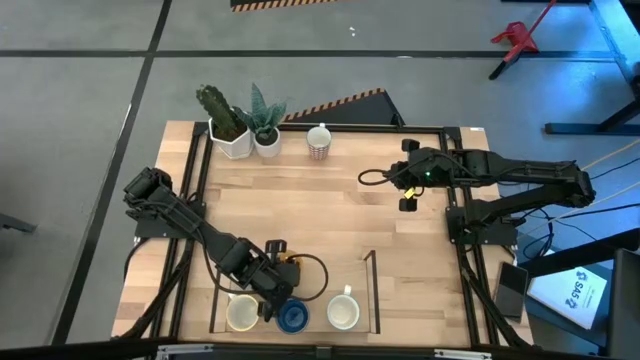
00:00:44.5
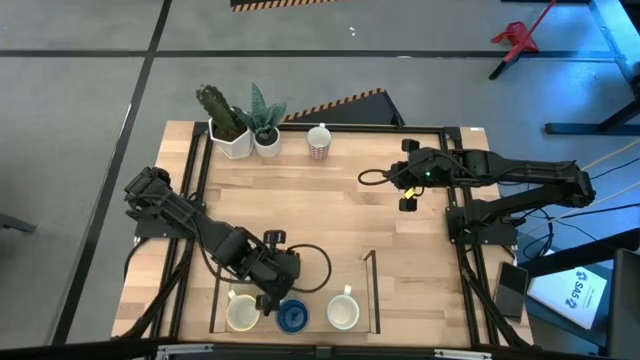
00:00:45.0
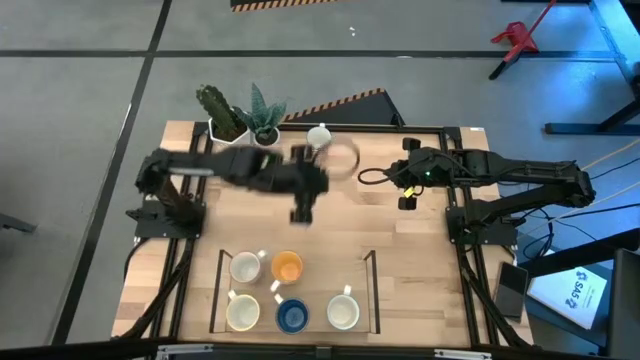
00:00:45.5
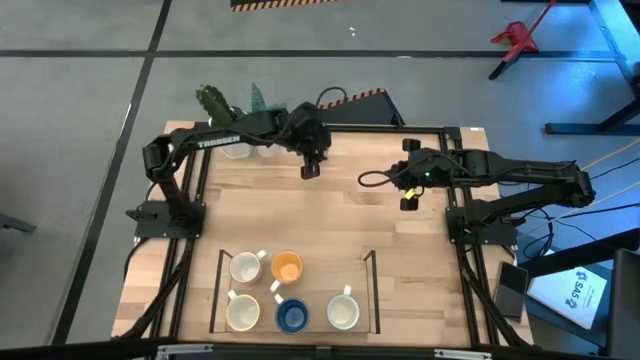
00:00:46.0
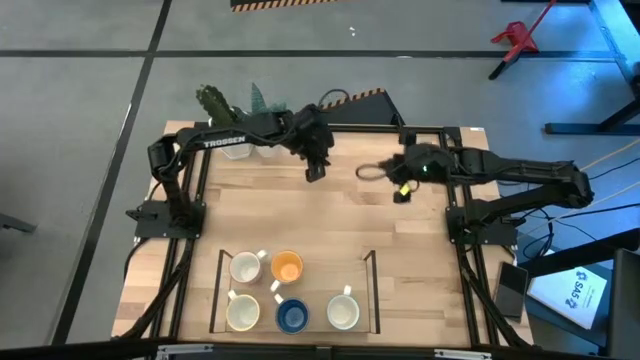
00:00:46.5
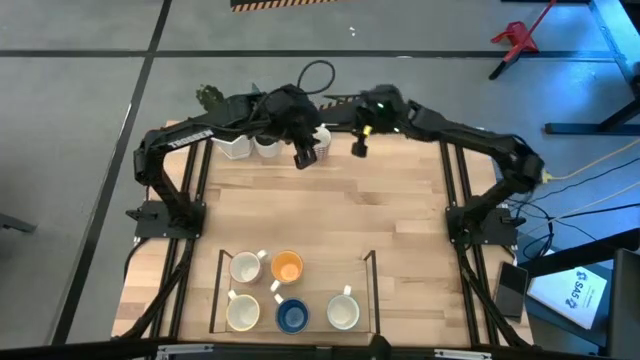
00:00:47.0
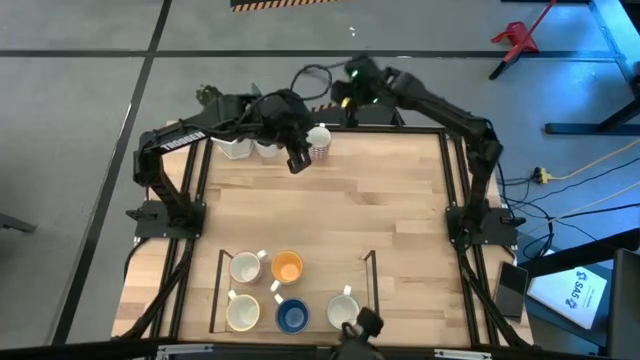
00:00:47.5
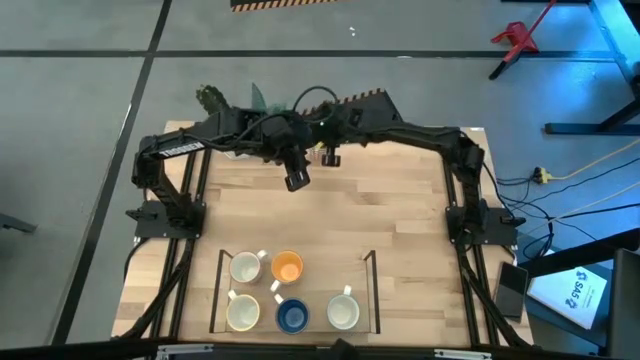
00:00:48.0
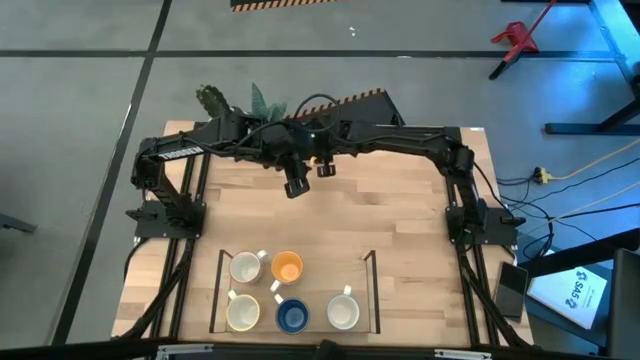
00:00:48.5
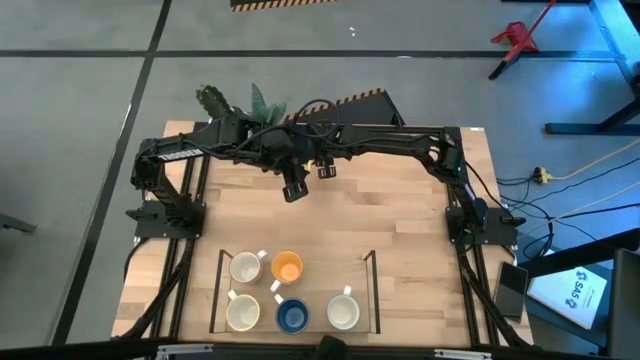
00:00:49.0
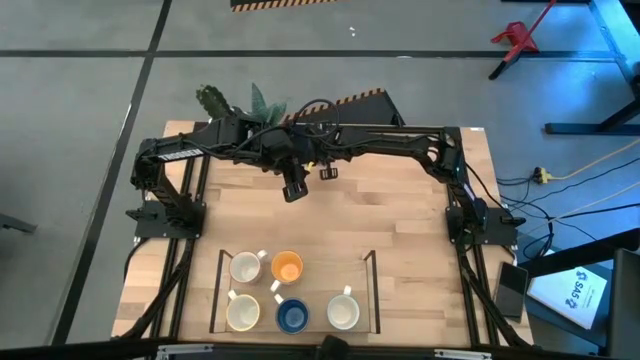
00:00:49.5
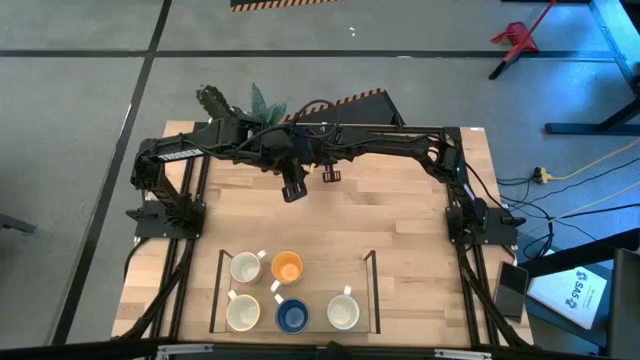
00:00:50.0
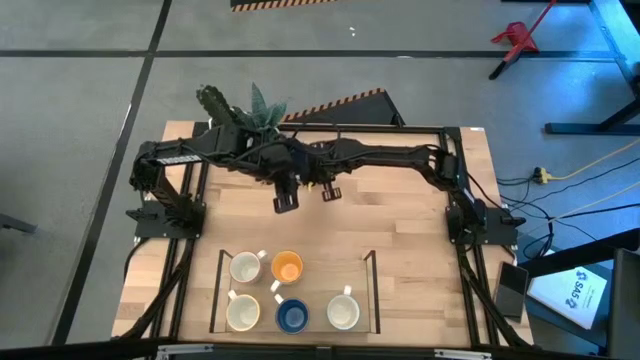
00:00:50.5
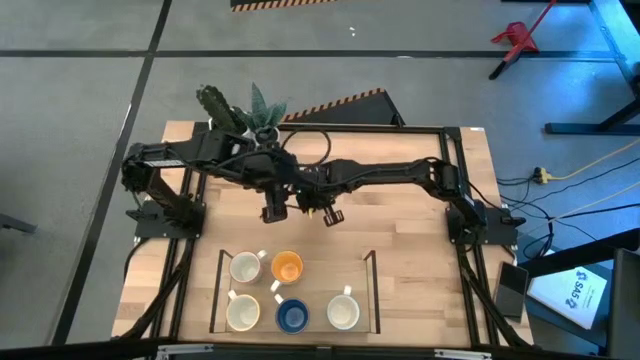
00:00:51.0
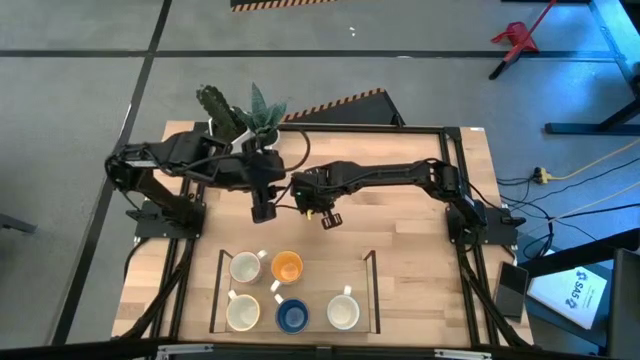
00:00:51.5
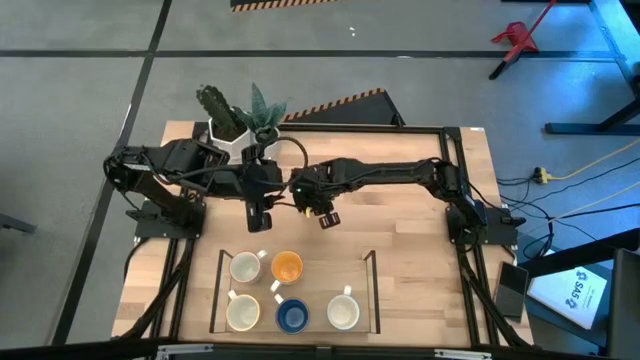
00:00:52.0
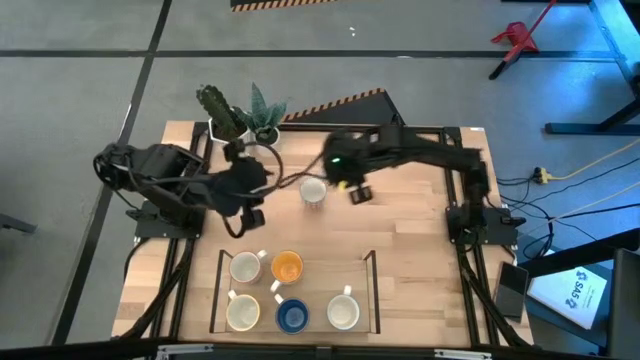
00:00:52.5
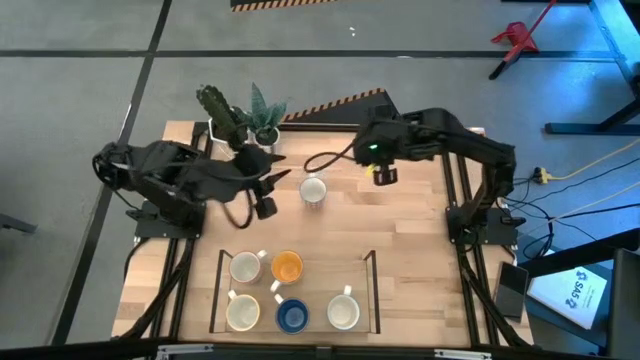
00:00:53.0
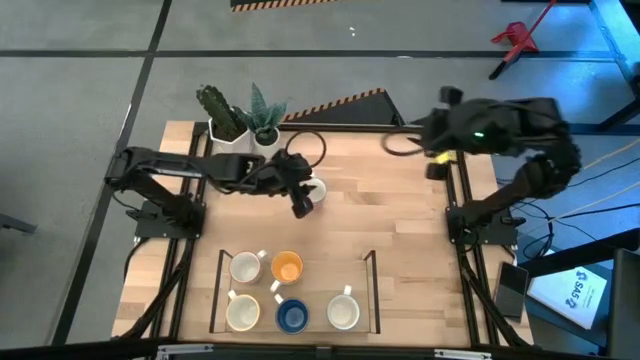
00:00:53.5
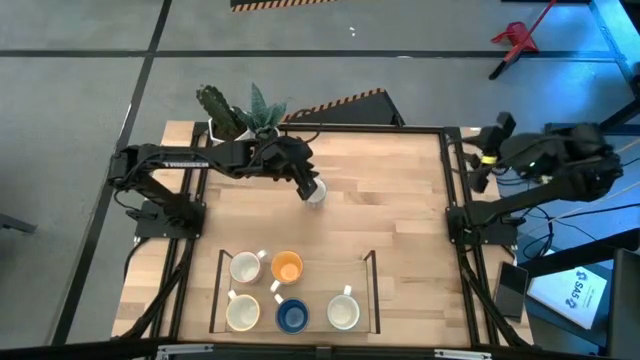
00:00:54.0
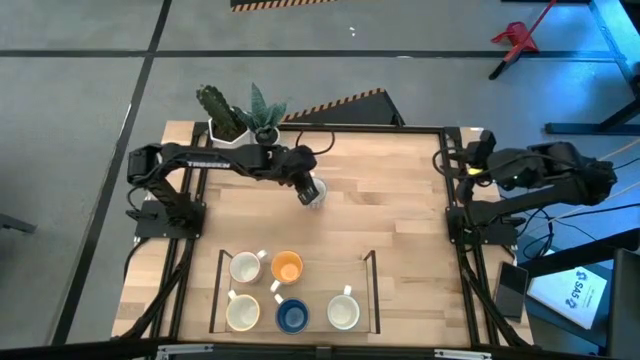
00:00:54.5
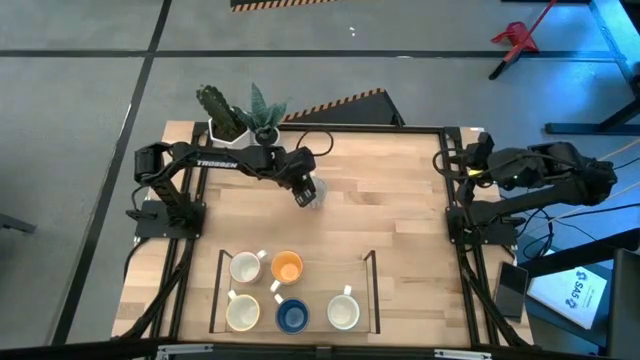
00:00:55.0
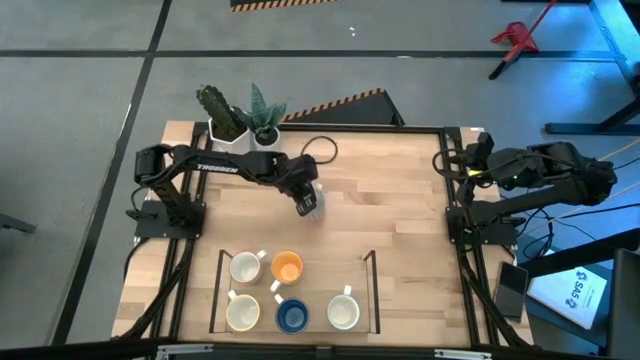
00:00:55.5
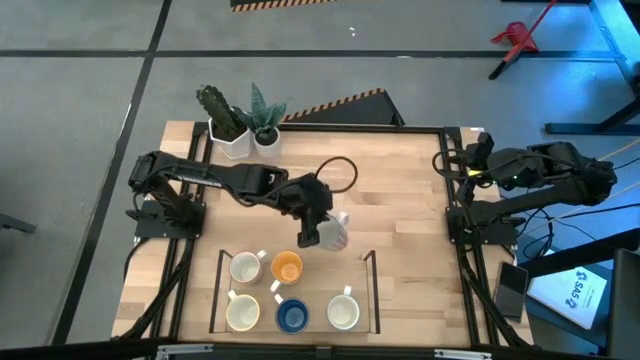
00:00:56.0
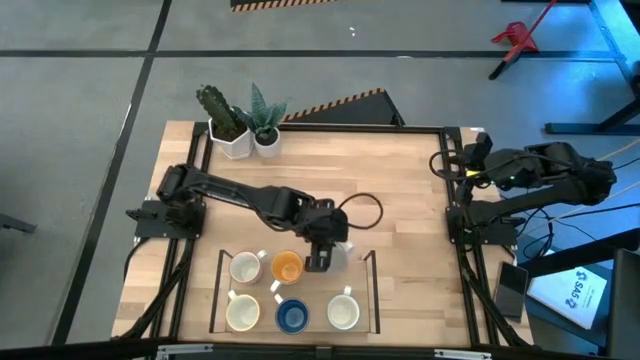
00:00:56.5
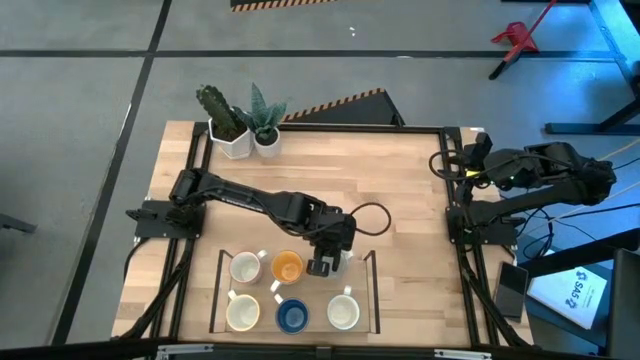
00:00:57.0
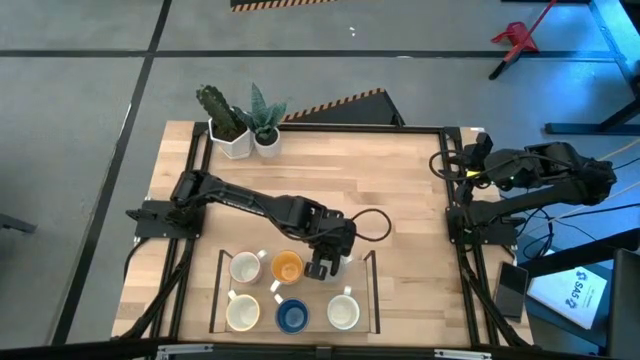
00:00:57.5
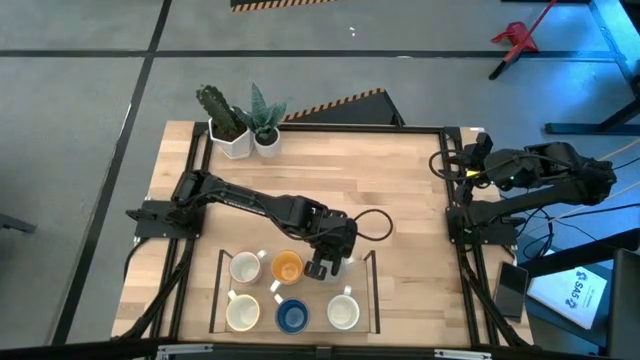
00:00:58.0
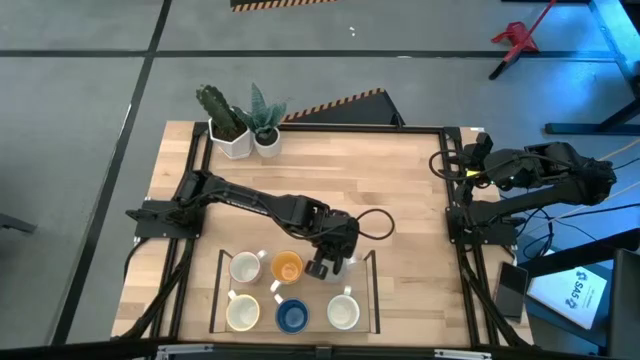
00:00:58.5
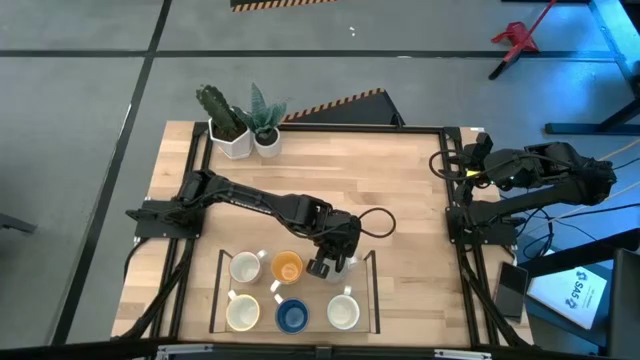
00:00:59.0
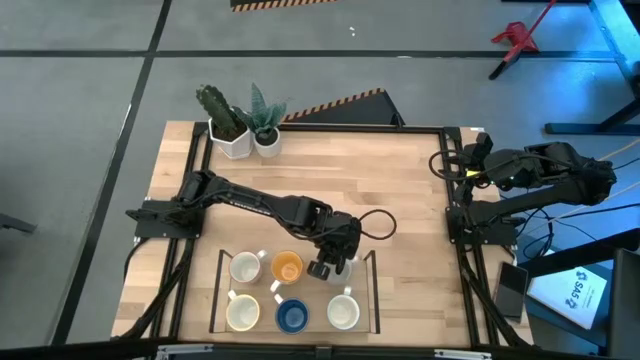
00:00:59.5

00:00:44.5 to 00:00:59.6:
Task: Place coffee mugs
Put the red patterned cup on the shelf

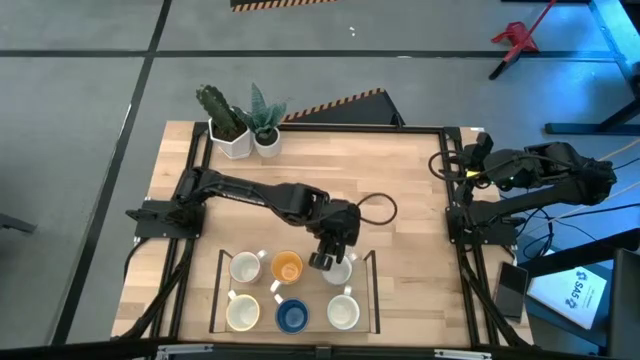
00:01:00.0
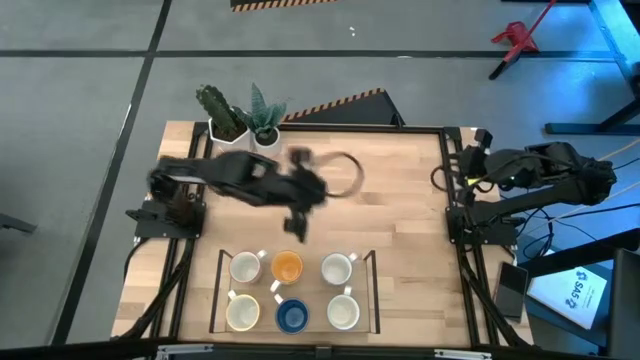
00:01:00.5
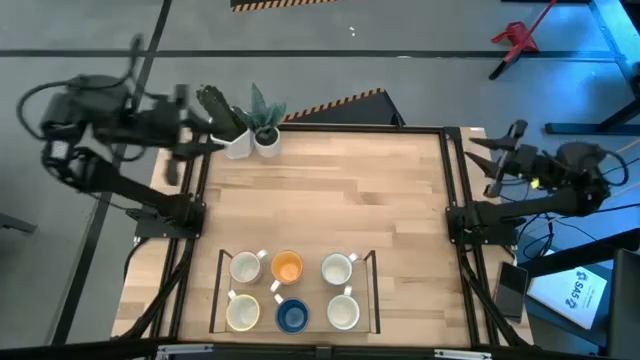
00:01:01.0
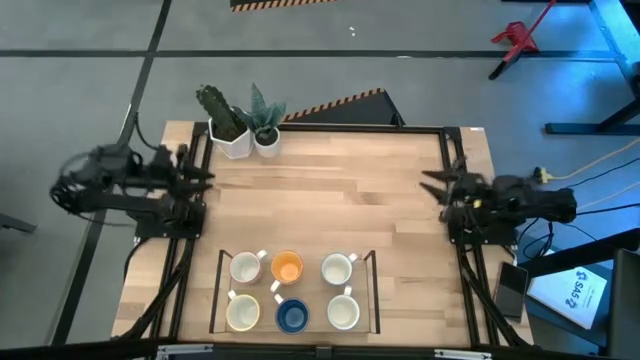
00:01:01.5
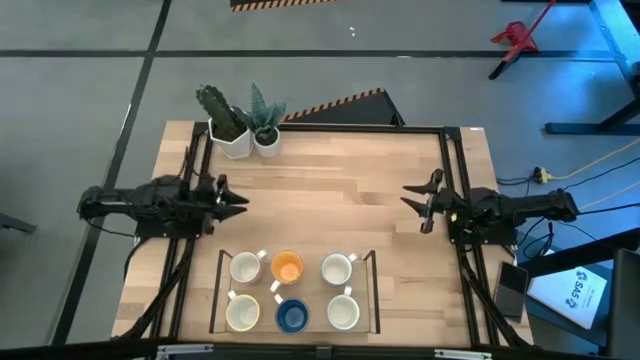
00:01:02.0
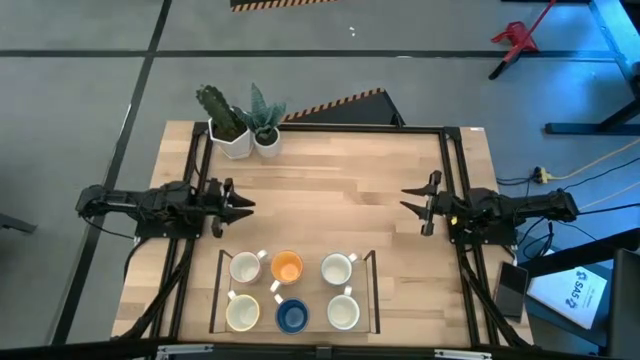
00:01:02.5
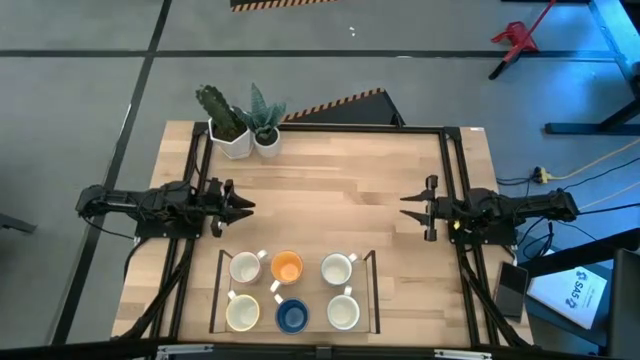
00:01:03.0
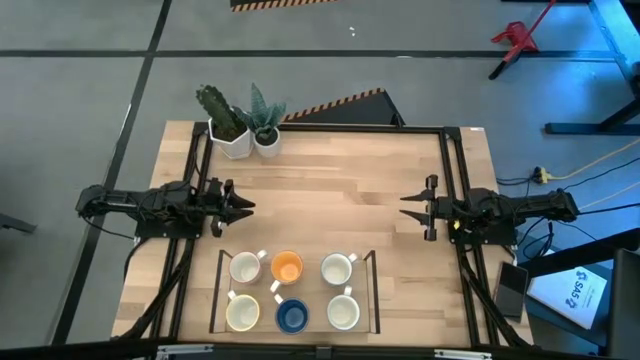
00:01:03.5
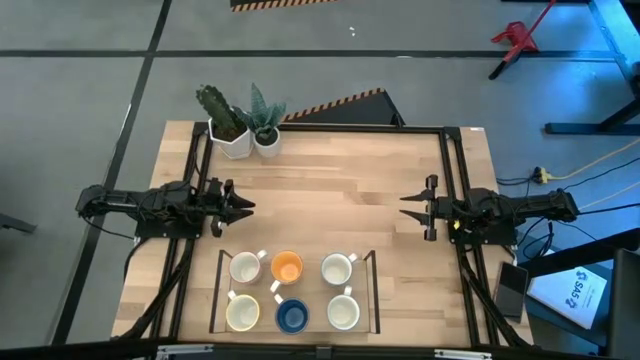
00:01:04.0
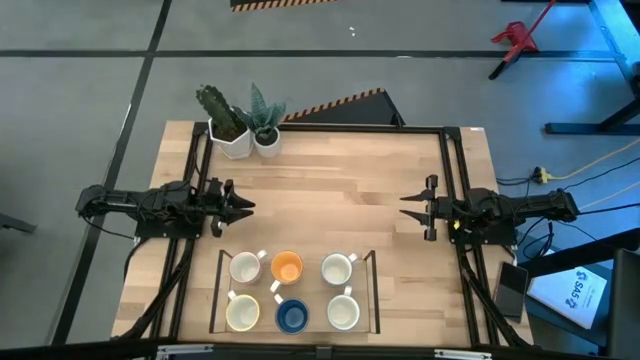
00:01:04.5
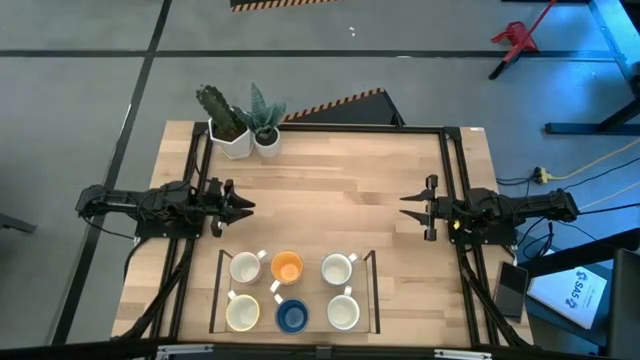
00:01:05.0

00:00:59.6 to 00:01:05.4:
Return to Home Position

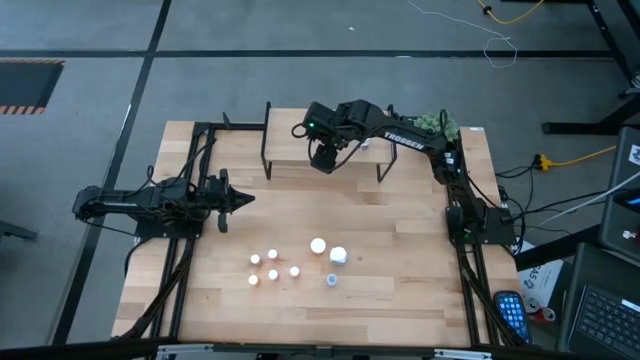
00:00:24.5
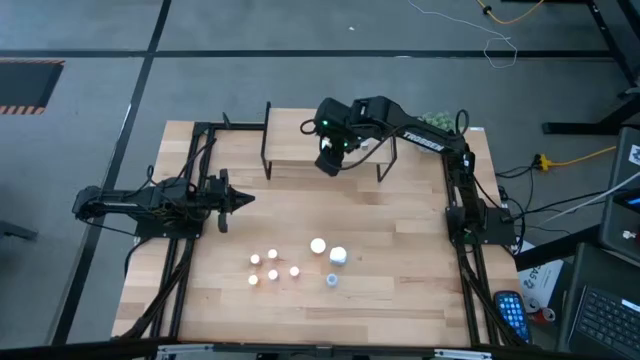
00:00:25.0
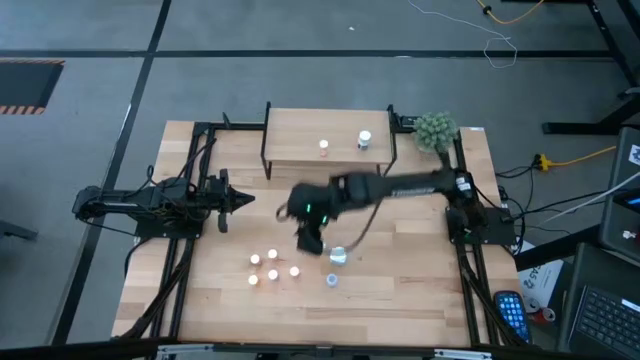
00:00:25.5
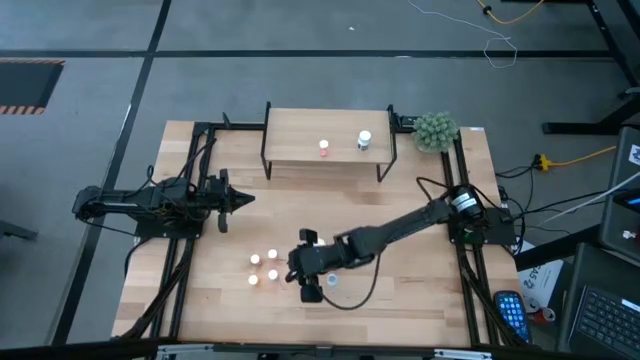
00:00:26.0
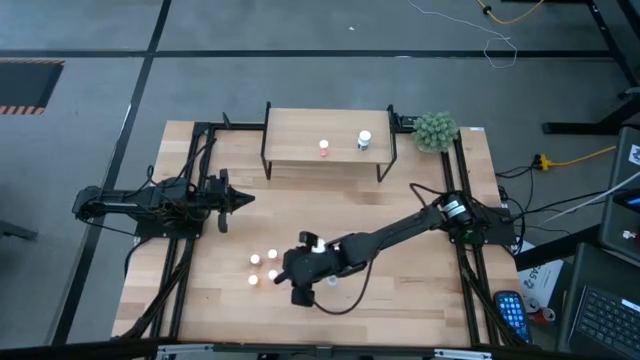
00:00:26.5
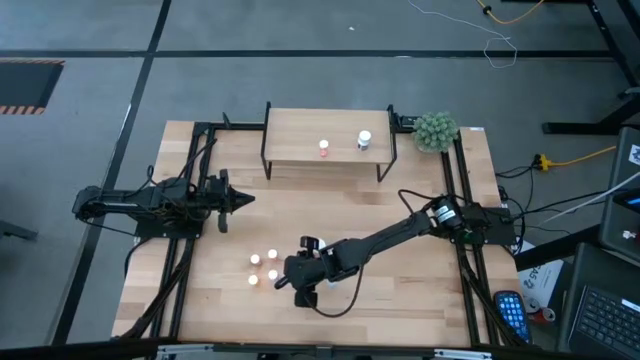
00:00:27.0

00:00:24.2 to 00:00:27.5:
Task: Pick and place medicine bottles onto shelf by color
Put the light orange pill bottle on the shelf
